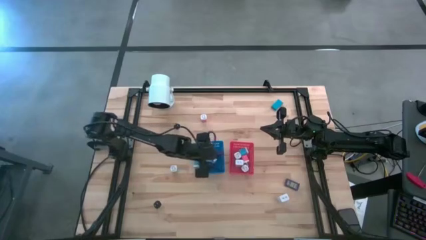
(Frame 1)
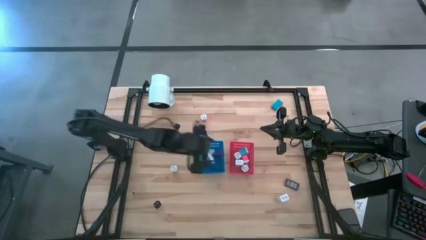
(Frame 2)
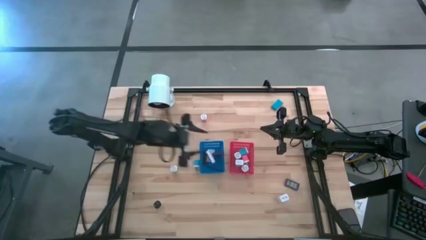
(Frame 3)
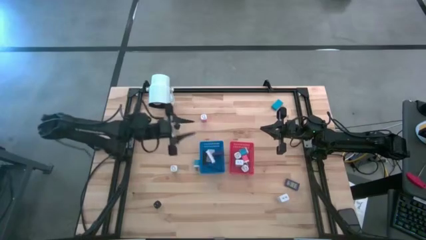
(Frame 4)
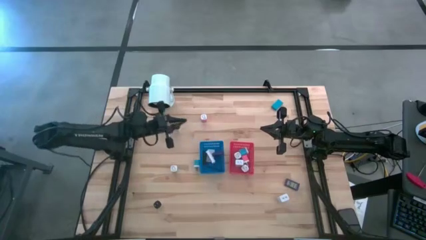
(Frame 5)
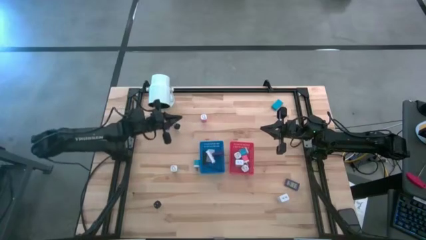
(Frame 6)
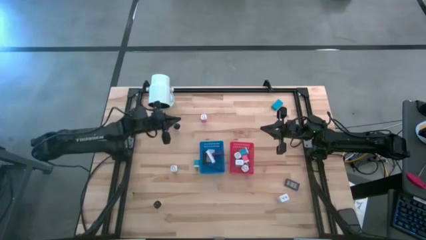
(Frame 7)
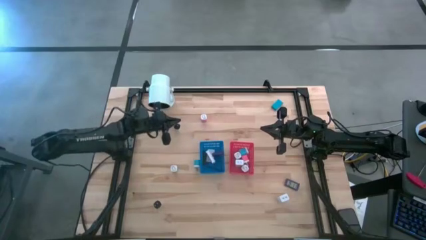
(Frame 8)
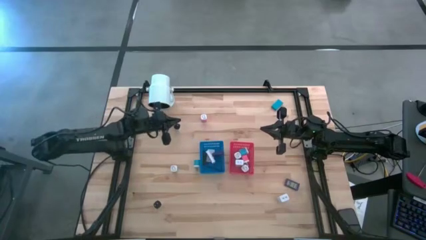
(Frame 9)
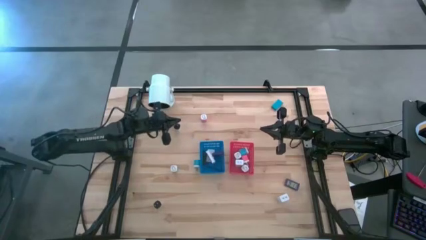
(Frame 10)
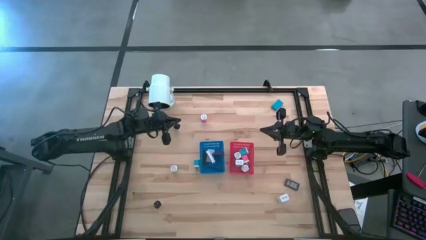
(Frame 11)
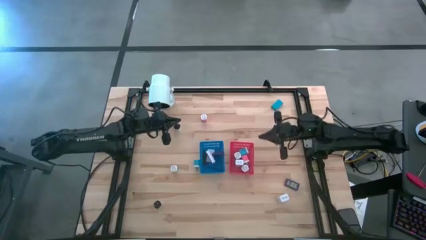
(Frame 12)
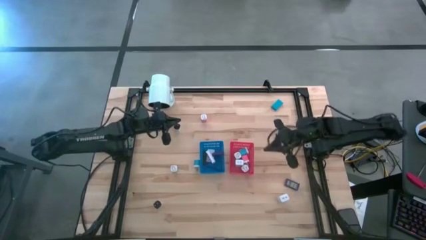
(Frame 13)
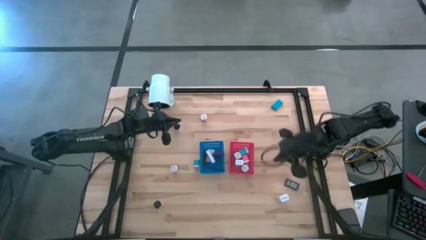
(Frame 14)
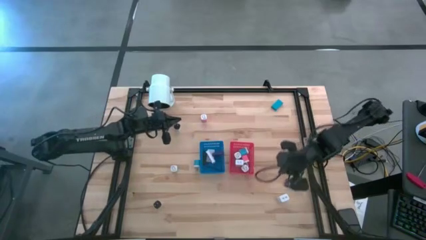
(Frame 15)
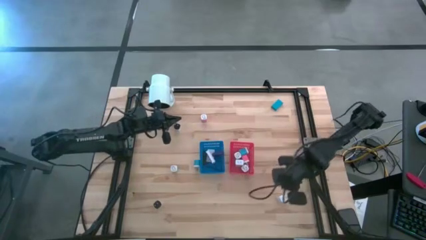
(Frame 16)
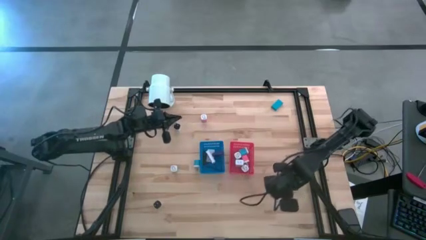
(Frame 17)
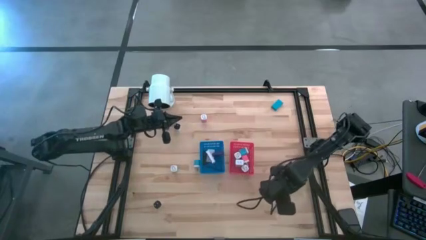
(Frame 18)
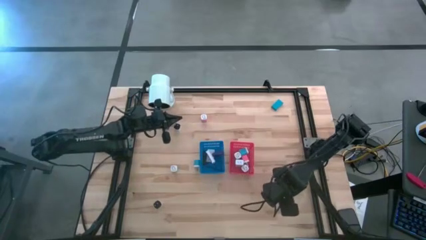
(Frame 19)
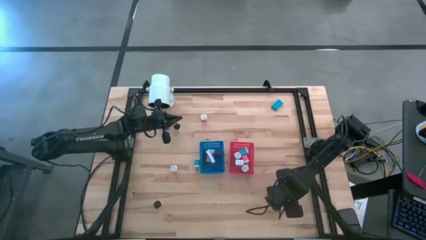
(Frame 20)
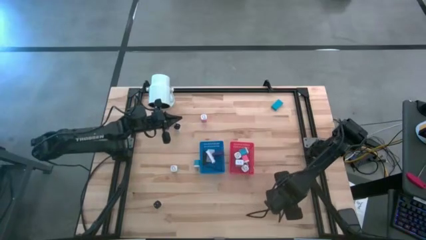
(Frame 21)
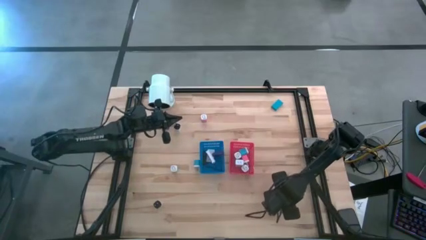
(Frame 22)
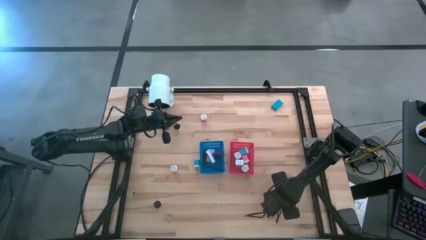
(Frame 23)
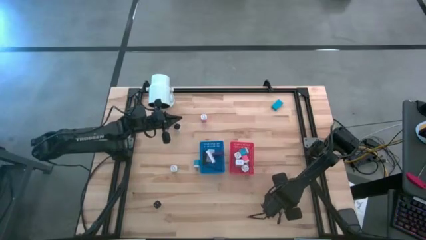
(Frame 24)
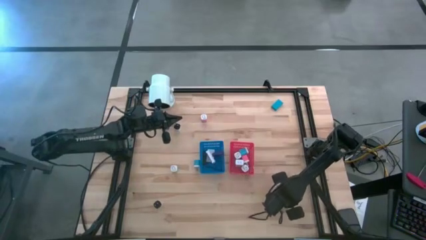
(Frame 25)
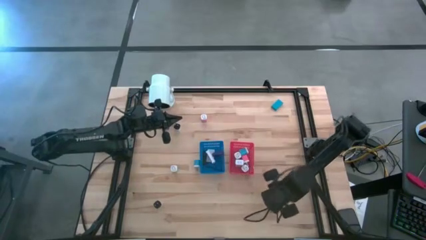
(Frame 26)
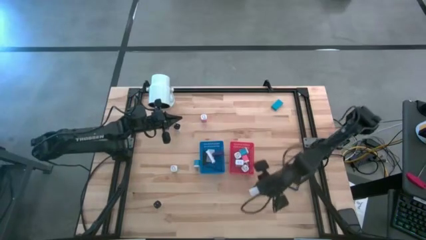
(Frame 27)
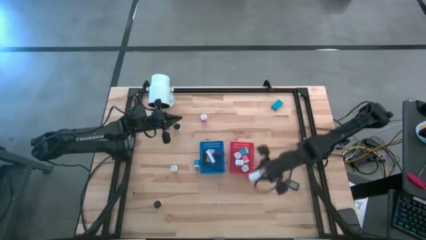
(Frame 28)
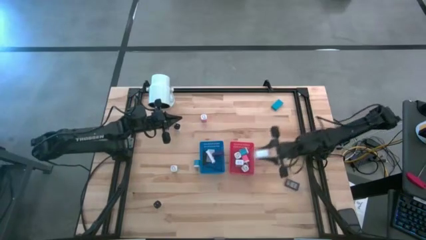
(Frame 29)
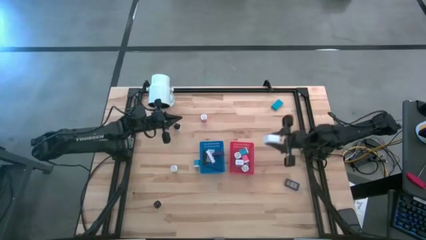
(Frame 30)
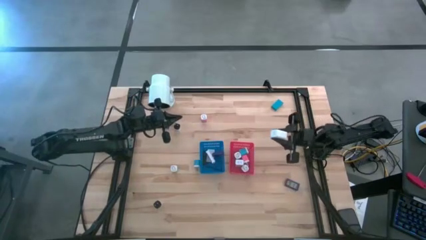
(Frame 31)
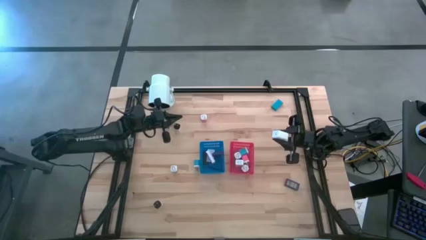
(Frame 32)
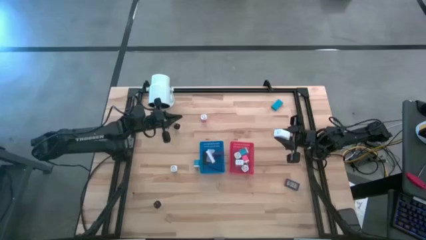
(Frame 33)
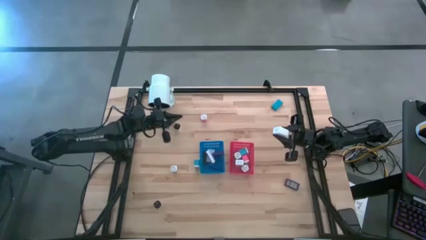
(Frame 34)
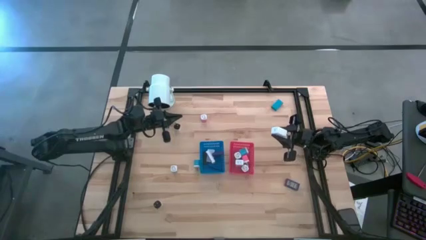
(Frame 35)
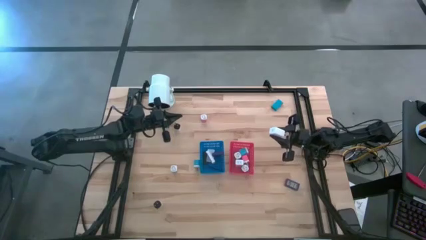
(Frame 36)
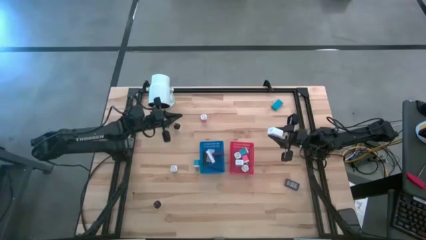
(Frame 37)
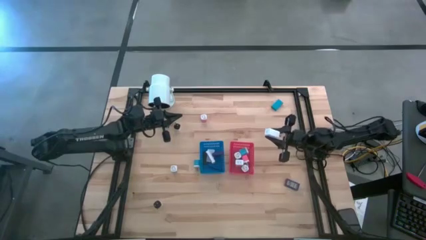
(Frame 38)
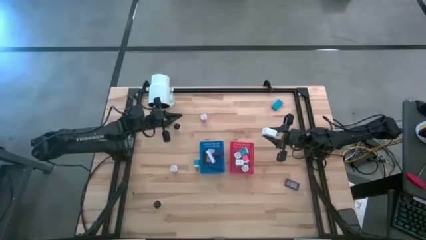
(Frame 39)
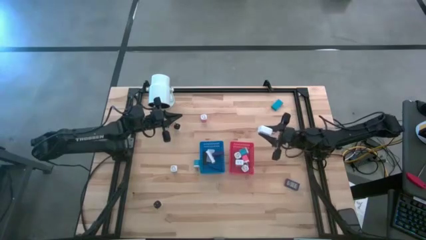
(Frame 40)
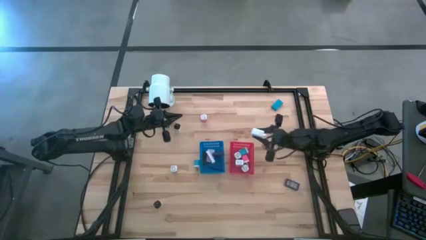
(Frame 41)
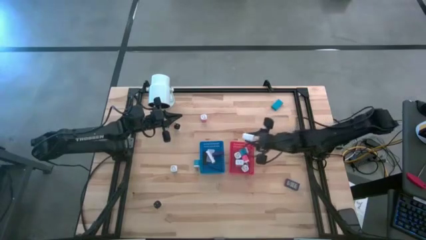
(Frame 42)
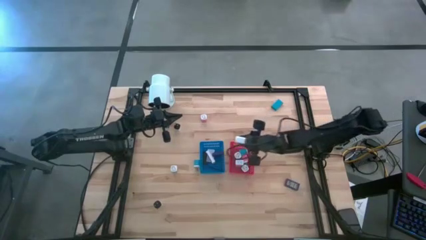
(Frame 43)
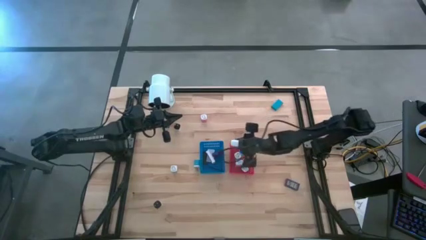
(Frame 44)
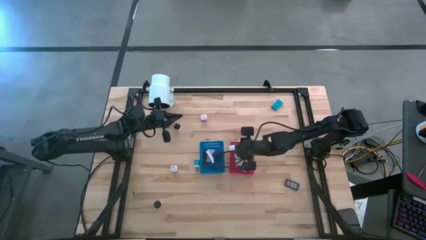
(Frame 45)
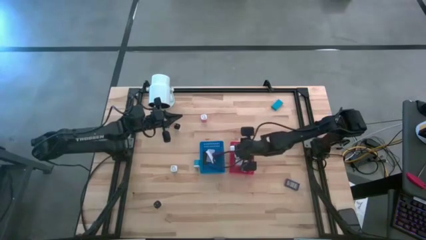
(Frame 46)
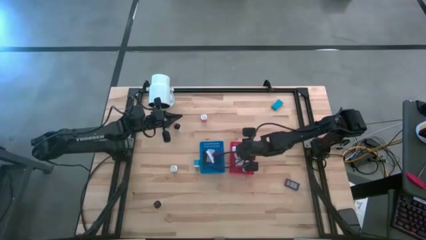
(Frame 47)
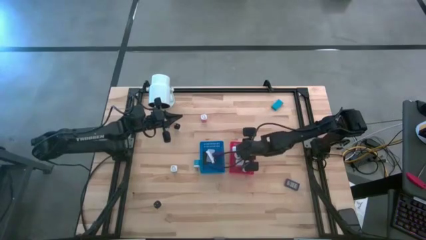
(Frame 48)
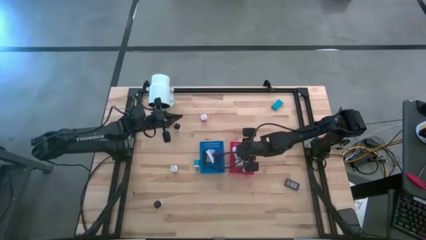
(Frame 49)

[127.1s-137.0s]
Task: Sort adapters and digital timers
Put the bottom right white charger adaptor into the red bin

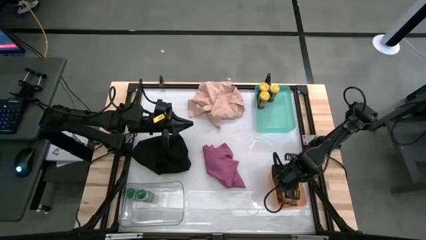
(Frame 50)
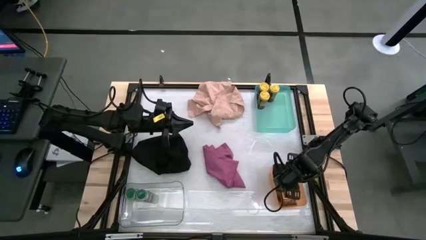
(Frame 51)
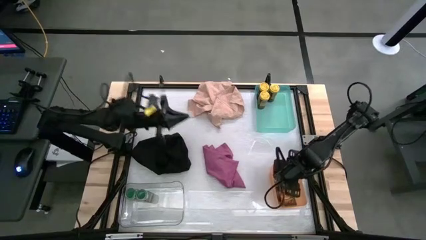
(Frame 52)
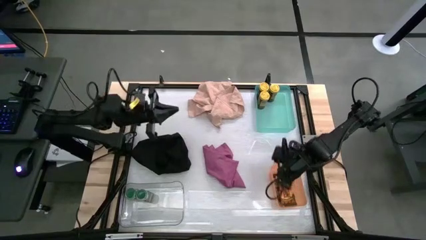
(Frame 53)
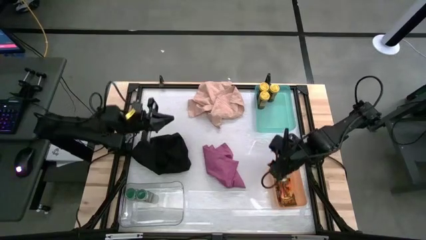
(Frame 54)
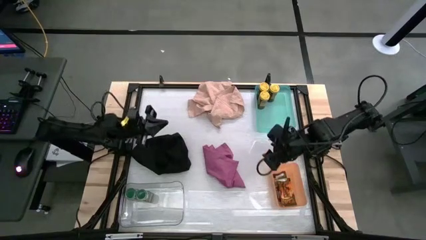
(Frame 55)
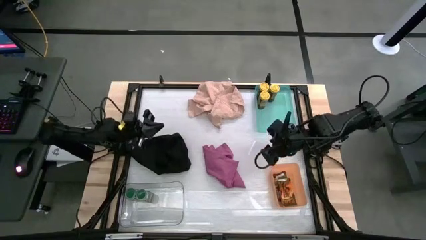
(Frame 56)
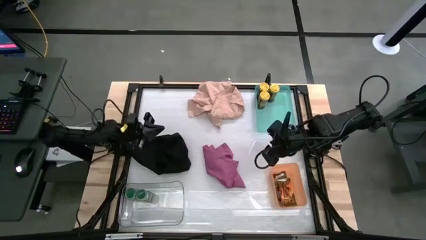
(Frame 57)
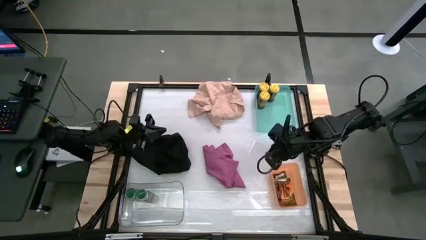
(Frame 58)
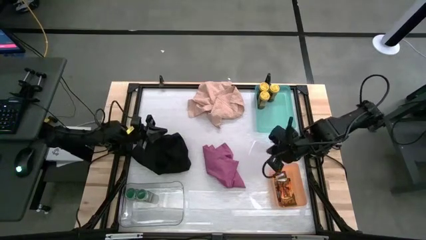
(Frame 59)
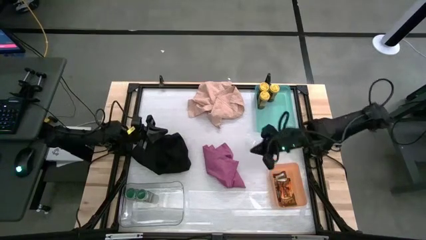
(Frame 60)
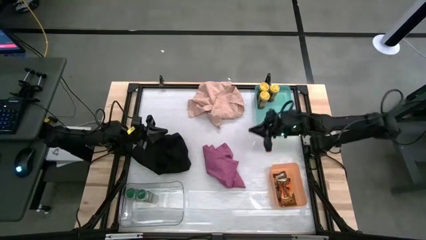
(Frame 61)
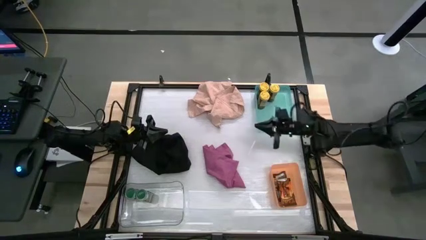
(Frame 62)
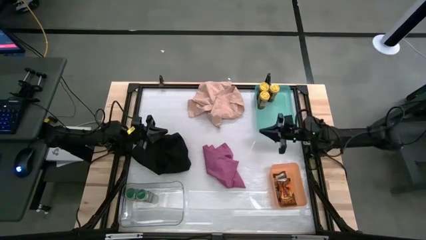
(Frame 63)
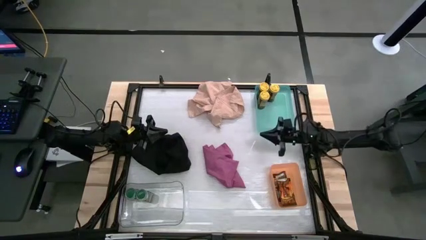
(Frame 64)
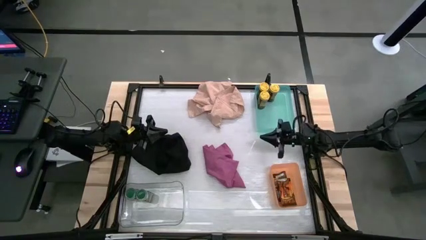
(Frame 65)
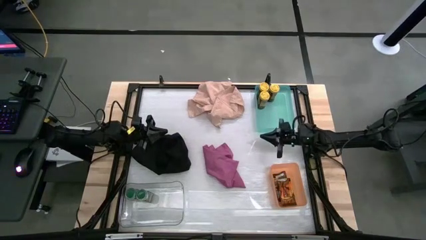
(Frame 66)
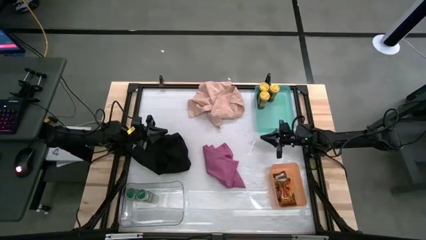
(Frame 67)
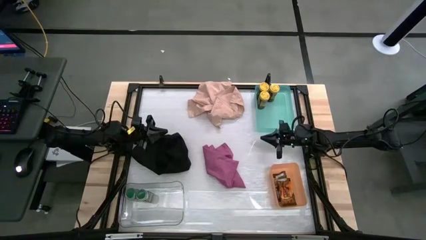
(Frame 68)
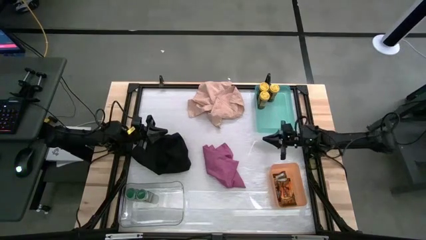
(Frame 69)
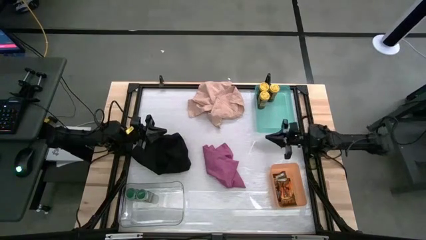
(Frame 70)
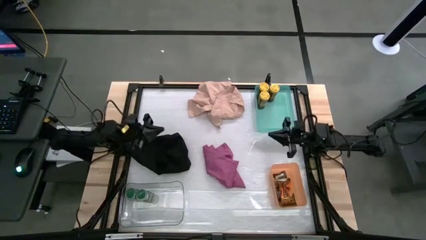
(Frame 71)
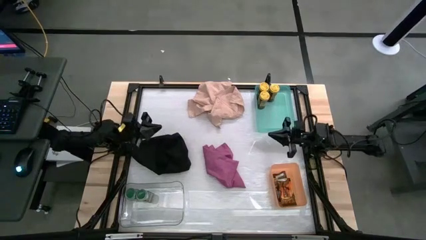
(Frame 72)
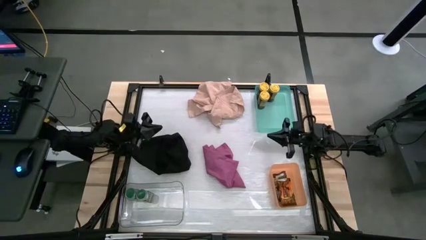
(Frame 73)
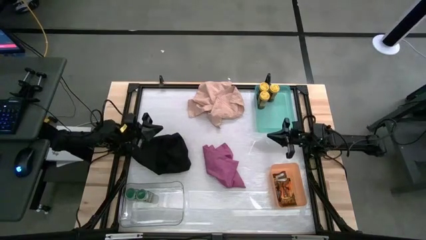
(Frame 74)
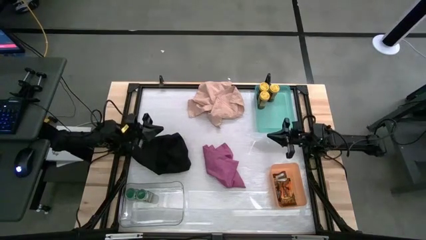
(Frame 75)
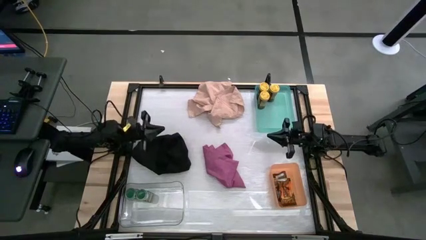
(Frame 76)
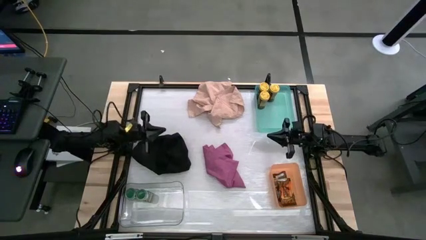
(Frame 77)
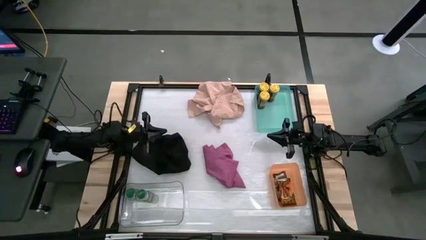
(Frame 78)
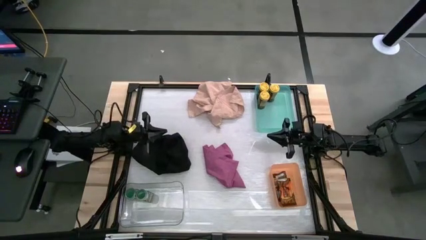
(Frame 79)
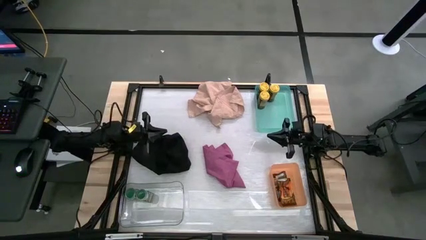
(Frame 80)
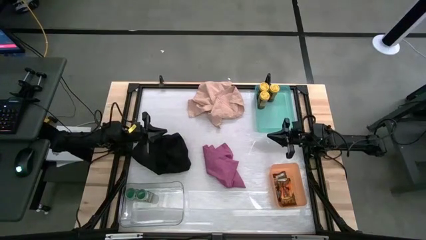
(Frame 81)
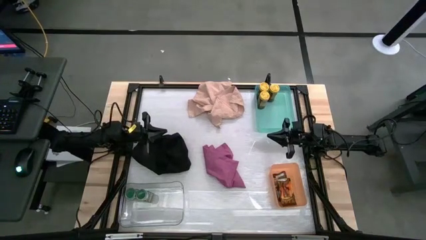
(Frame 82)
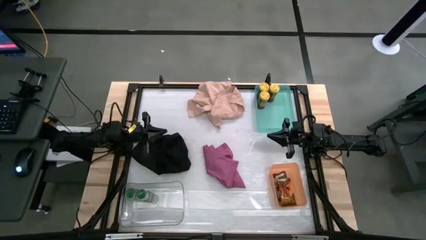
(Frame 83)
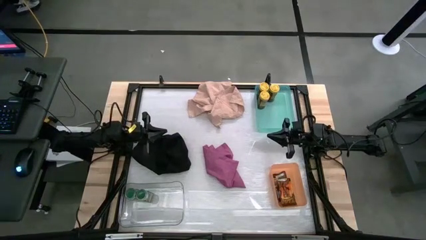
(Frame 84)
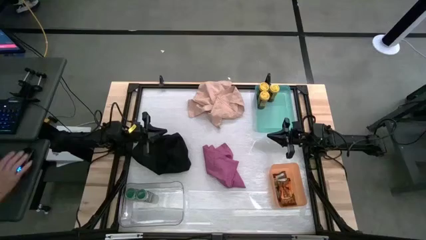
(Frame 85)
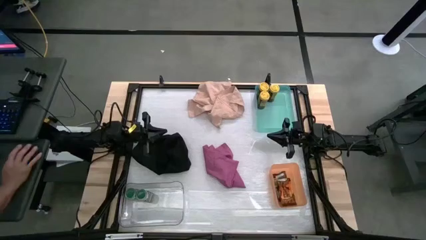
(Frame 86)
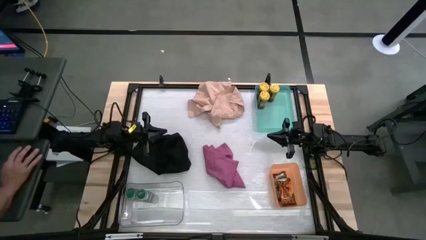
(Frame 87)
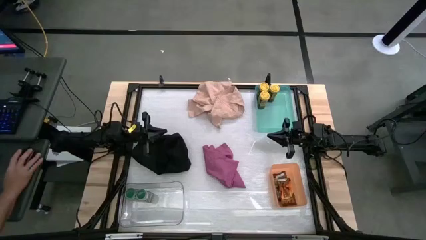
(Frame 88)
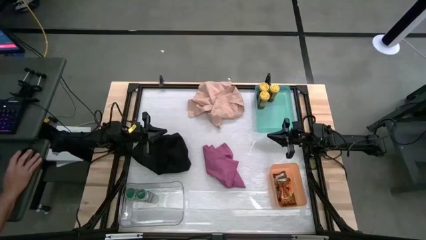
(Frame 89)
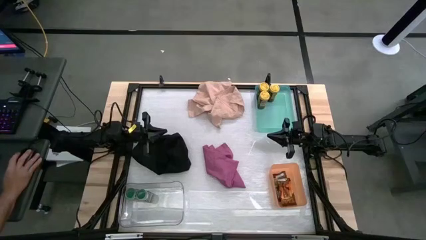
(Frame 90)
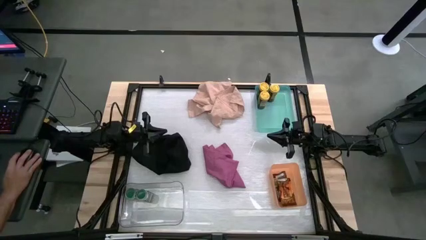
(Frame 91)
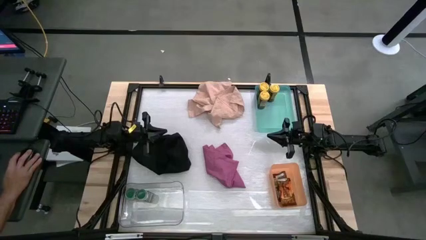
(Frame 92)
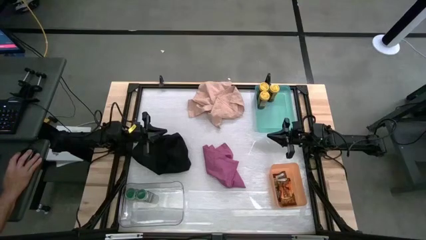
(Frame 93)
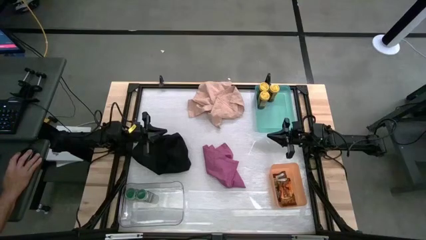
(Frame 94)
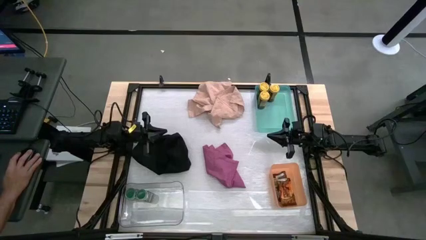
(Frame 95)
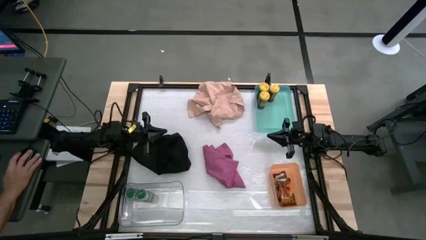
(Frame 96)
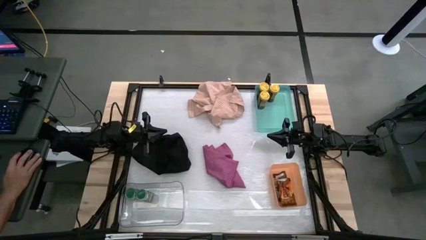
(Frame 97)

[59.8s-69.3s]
Task: Sort spices by type
Return to Home Position
